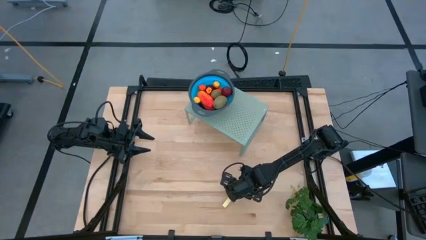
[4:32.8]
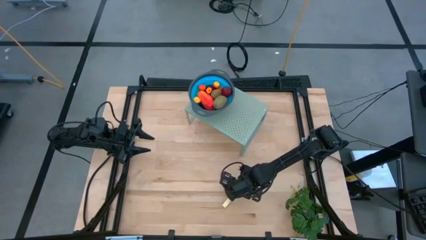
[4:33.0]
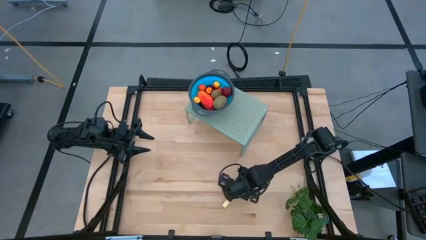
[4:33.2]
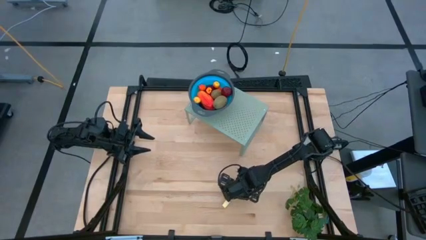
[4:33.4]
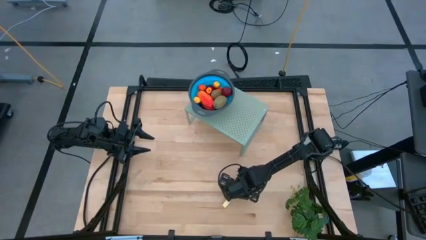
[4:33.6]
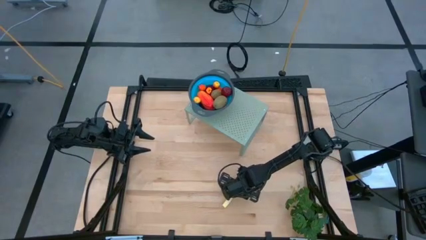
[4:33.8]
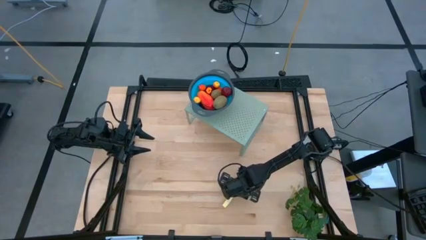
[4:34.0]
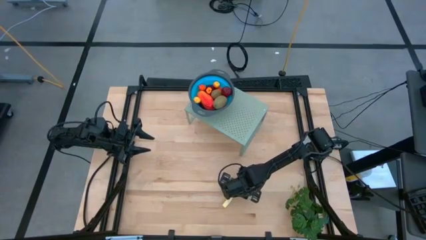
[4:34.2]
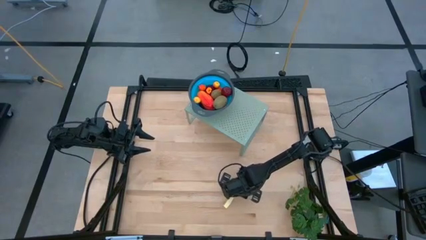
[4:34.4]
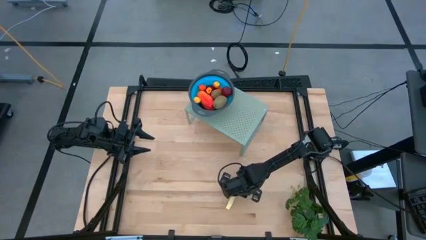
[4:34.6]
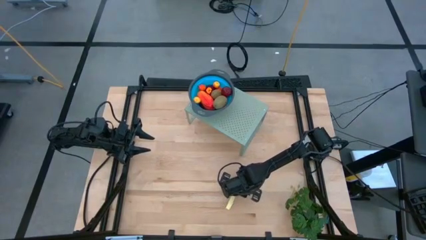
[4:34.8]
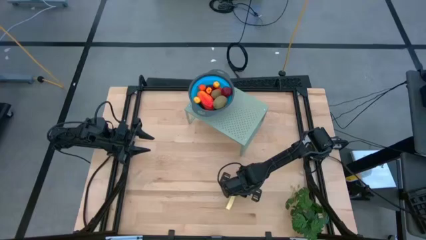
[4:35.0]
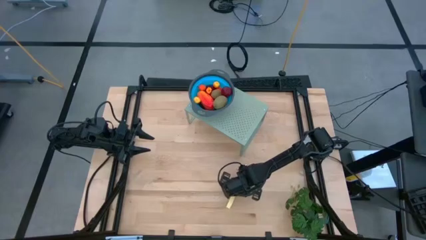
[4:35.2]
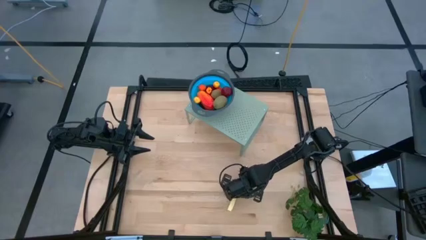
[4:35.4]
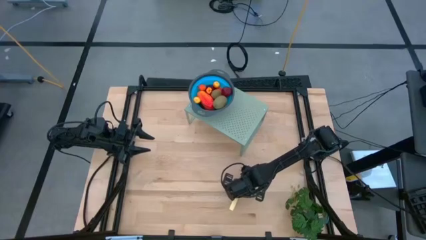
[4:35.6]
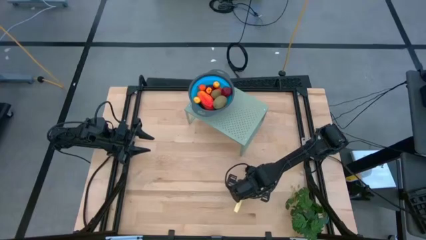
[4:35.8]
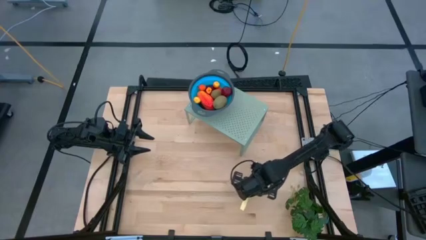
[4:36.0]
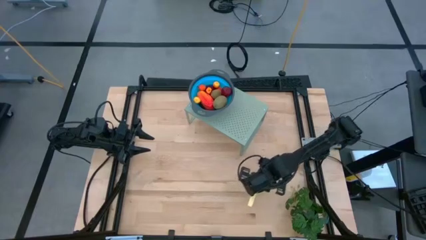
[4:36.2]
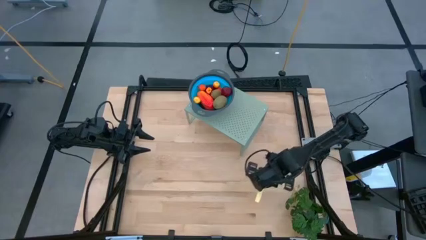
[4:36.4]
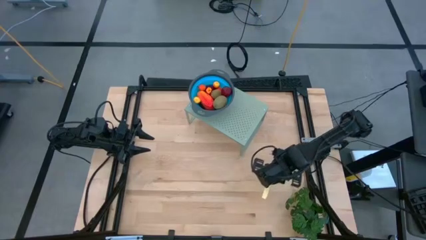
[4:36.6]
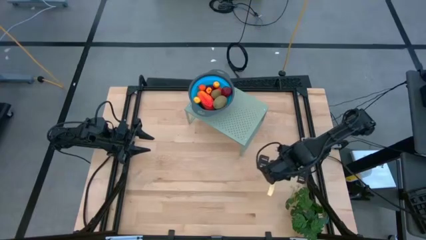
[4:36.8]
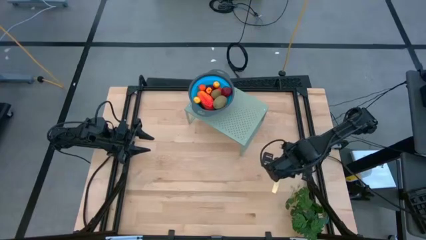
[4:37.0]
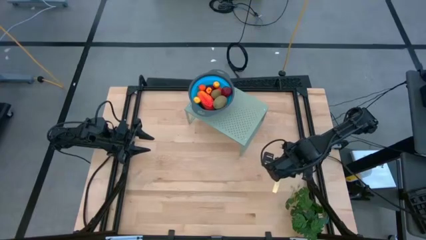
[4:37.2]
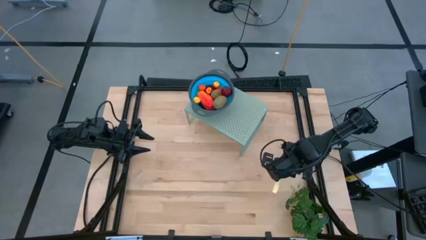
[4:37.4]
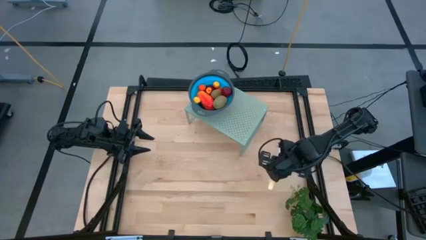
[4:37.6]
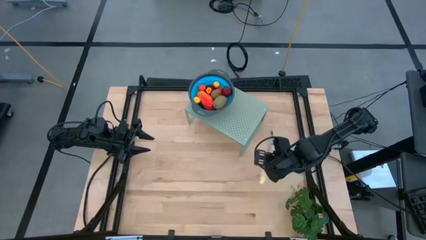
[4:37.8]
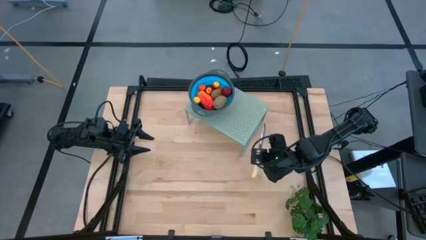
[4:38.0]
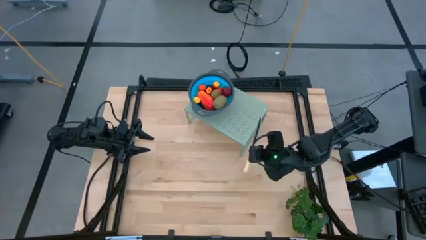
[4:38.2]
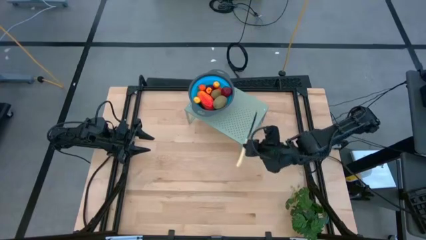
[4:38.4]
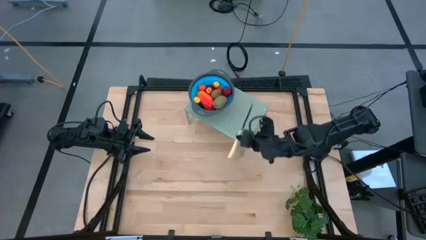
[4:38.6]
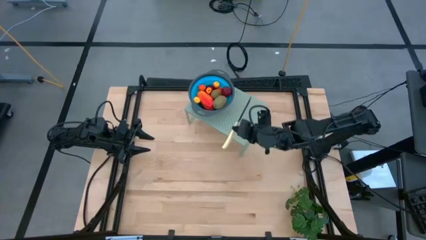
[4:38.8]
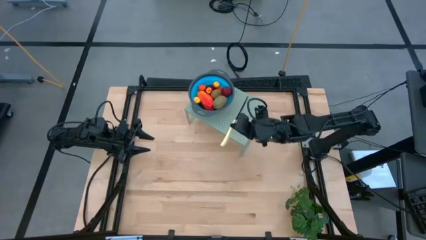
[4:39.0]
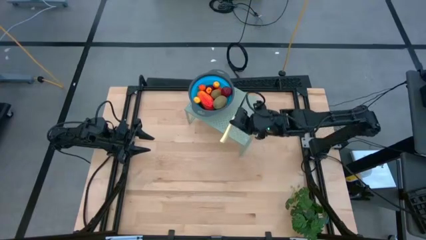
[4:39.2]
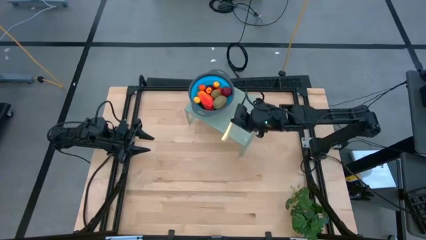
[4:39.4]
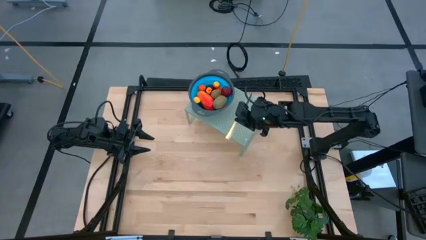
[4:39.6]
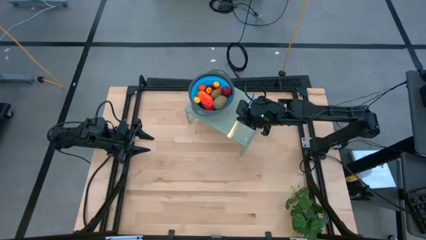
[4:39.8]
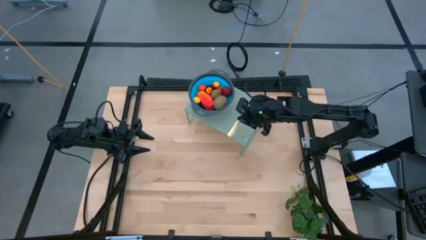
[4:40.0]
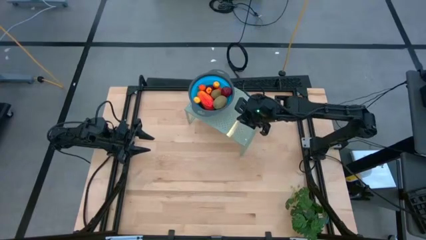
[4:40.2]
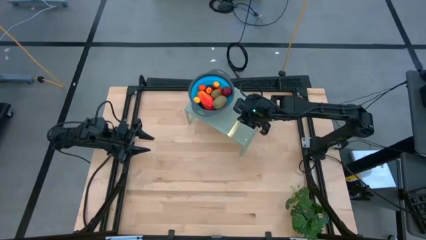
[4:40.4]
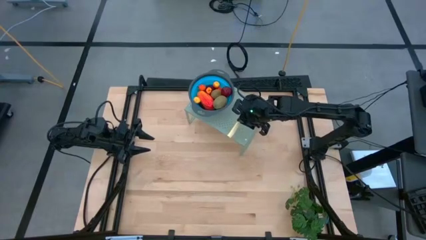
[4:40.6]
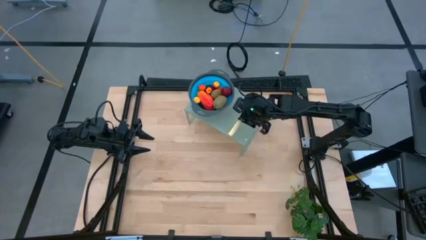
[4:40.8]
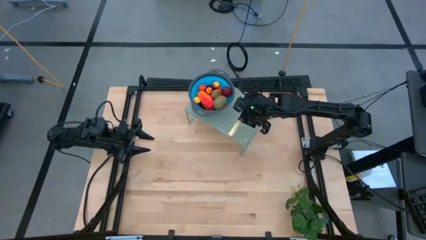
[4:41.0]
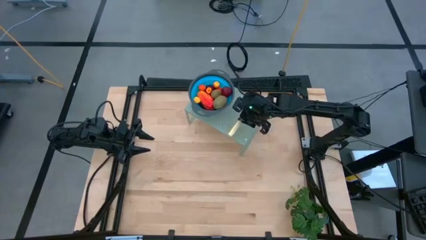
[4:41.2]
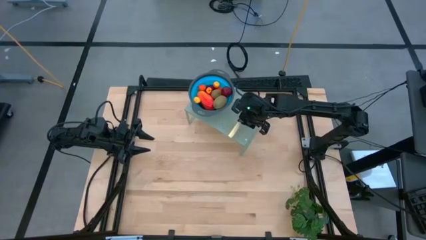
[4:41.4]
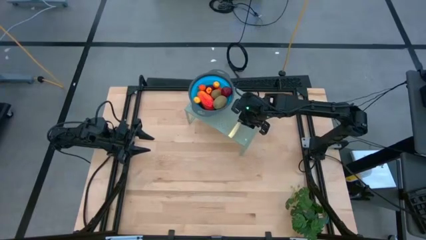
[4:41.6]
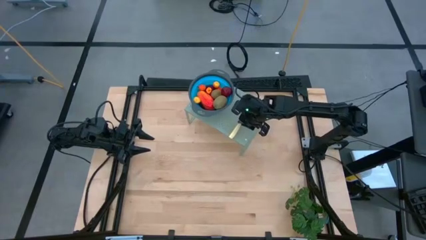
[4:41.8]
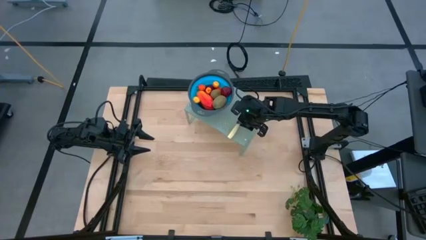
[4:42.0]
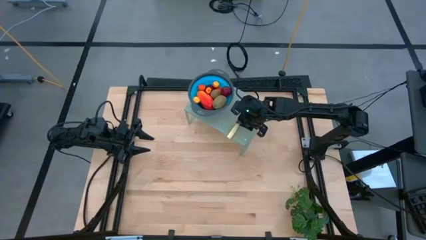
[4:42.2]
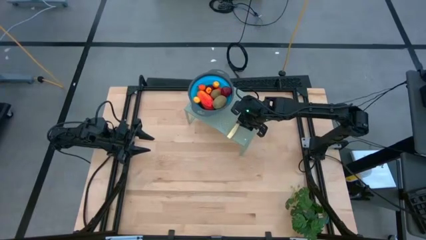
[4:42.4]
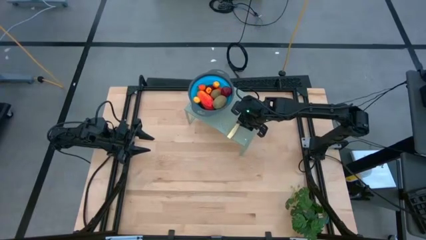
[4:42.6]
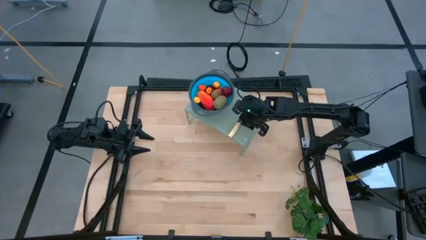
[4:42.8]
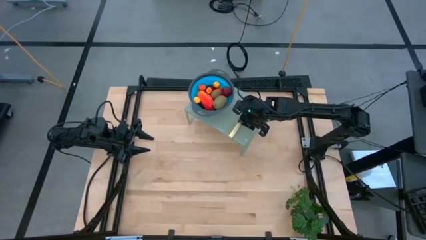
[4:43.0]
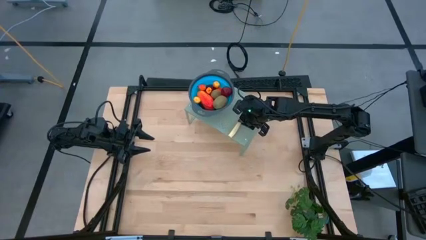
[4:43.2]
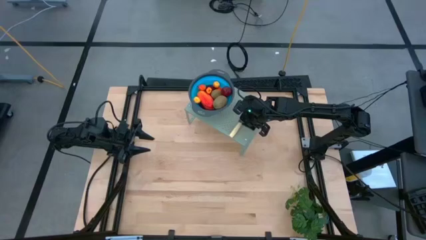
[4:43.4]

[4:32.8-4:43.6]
Task: Pick & Place Fruit
Put the yellow table knife on the shelf
